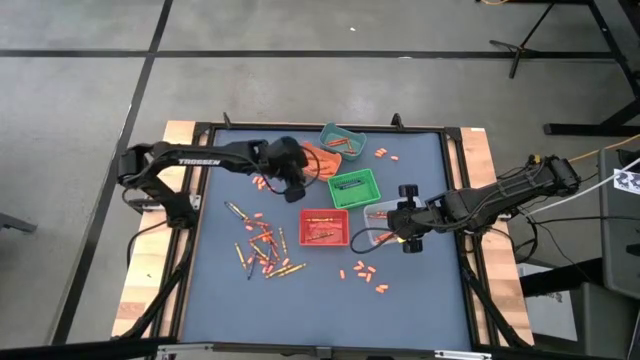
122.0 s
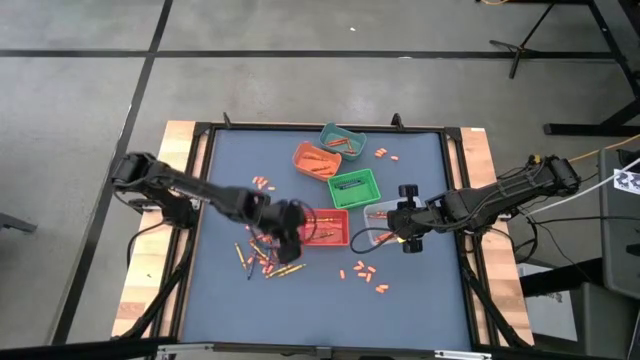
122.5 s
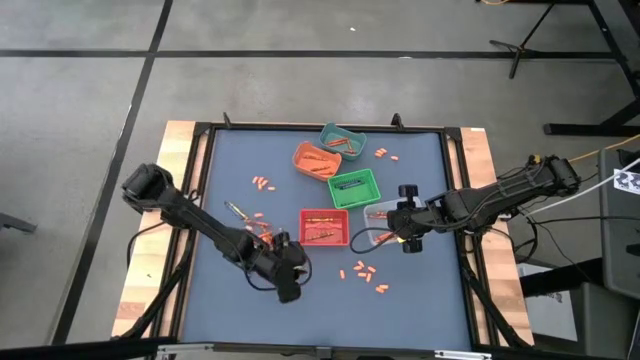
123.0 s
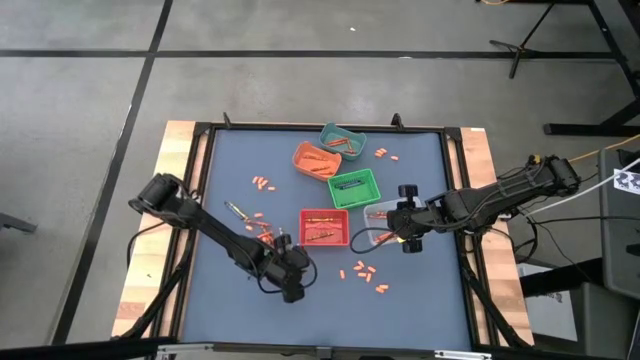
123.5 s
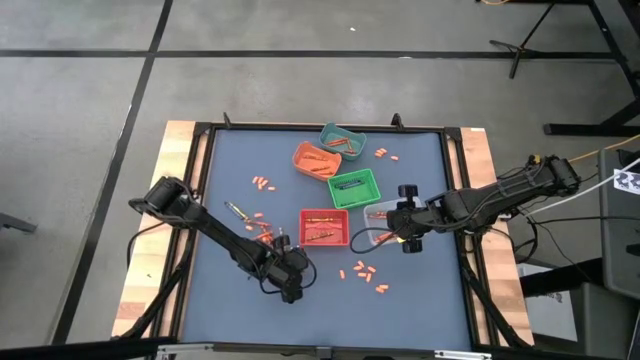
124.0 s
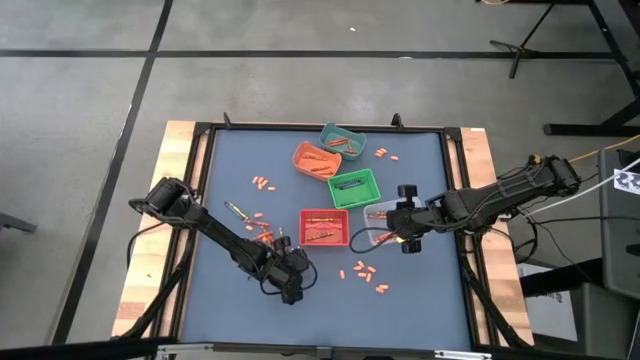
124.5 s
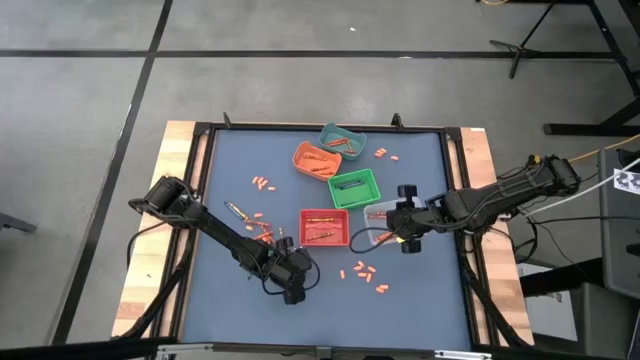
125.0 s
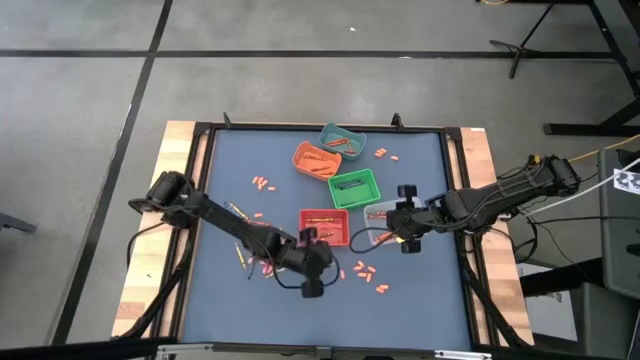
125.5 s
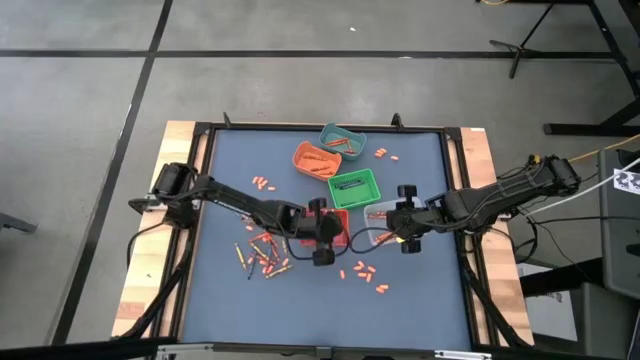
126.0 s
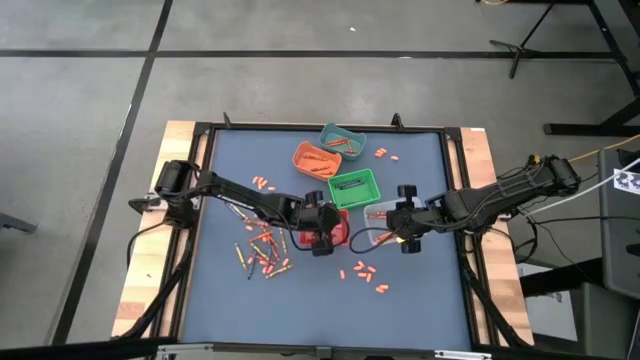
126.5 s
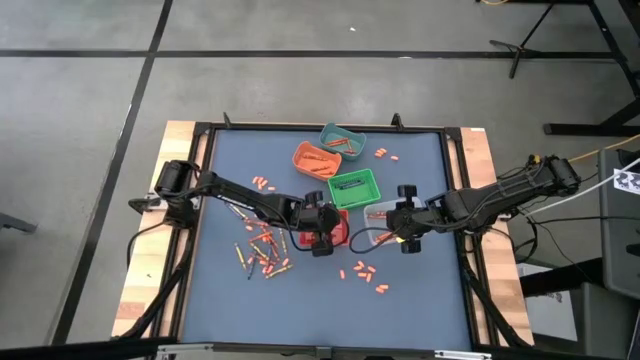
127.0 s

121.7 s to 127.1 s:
Task: Sort crayons
Put the yellow crayon into the red bin

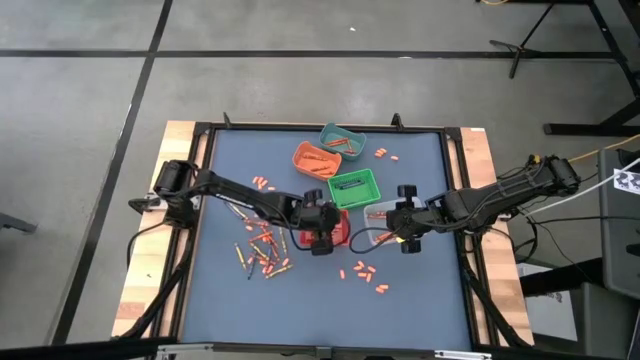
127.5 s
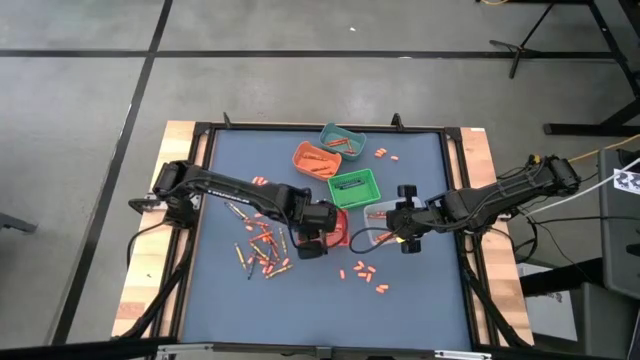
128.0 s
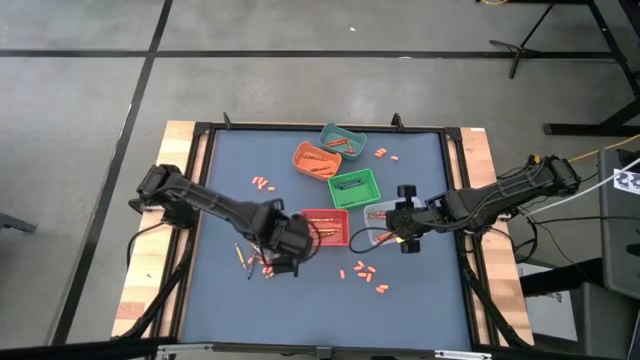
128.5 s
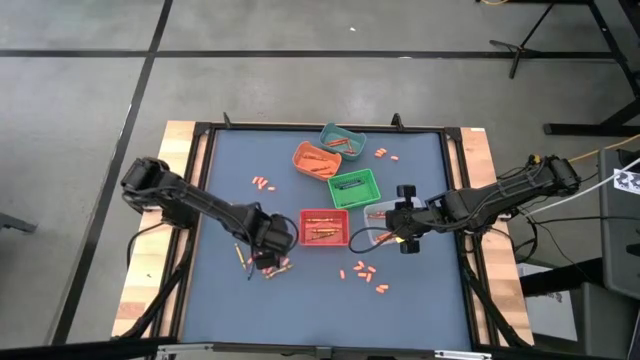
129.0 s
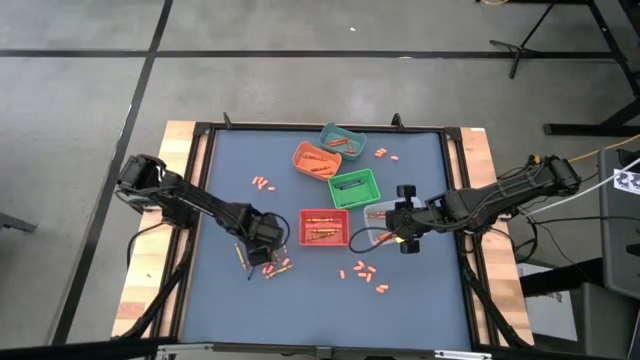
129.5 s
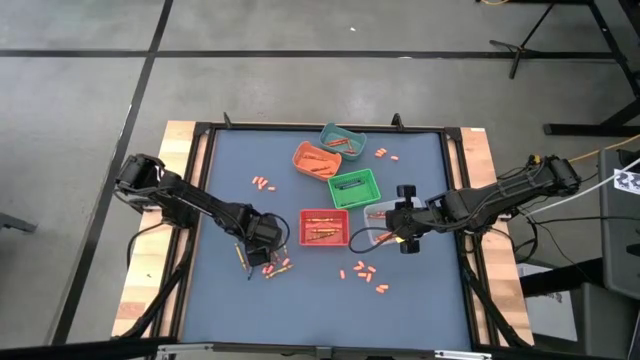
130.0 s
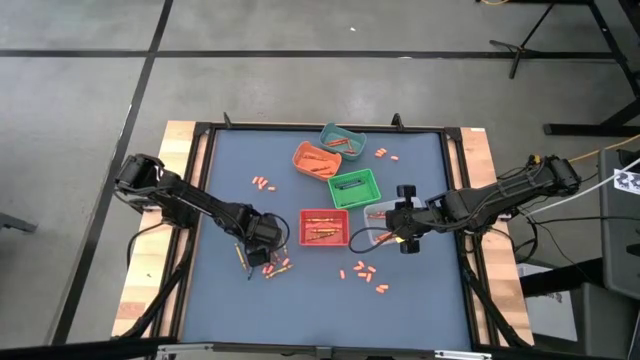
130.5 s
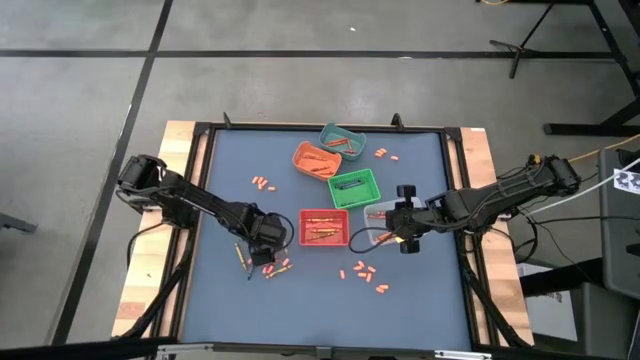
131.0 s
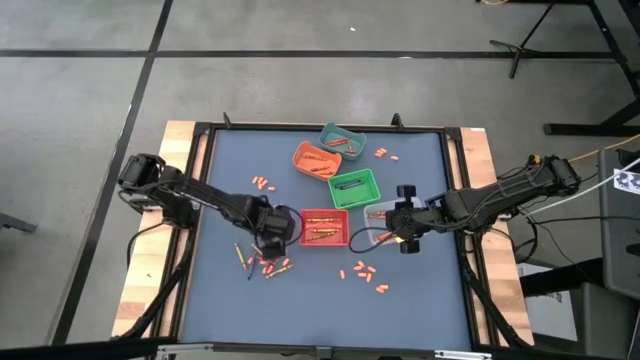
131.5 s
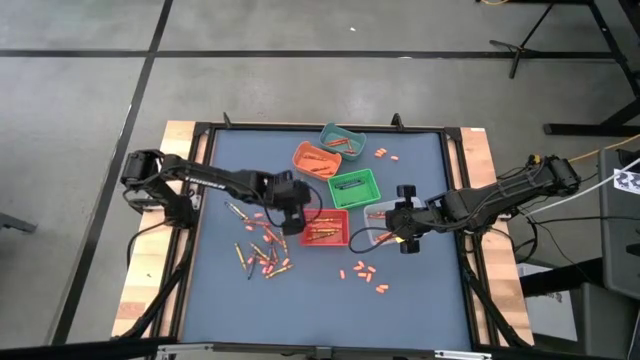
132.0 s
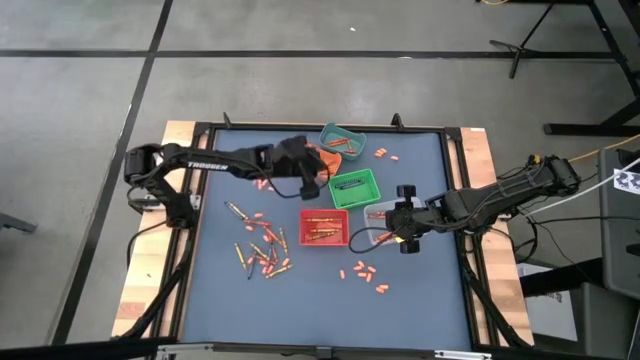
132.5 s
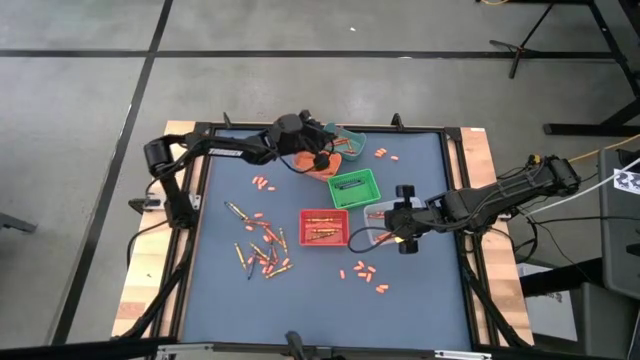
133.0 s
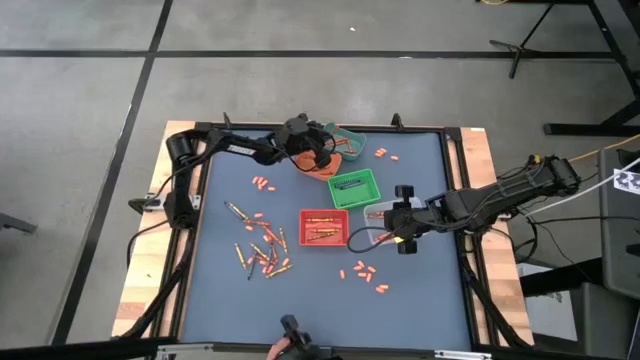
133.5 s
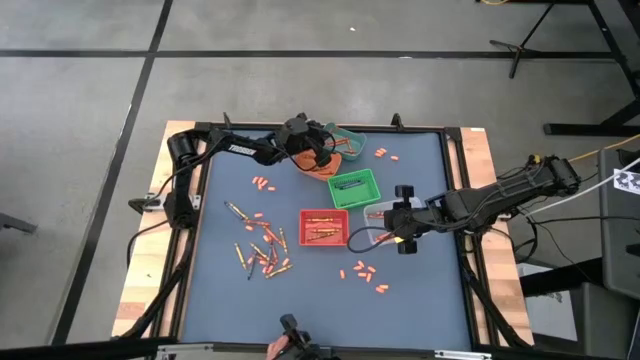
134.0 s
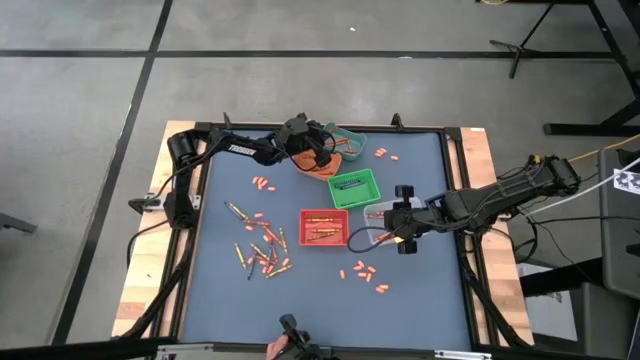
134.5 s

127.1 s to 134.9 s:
Put the red orange crayon into the blue bin

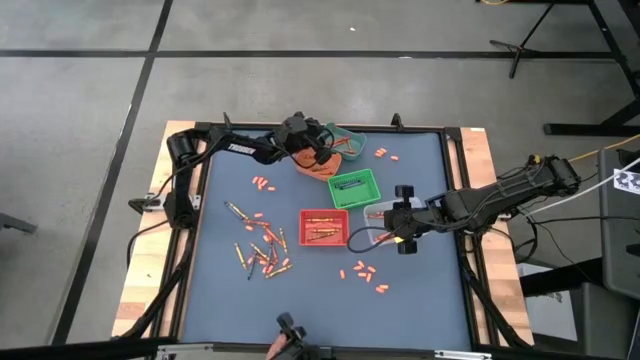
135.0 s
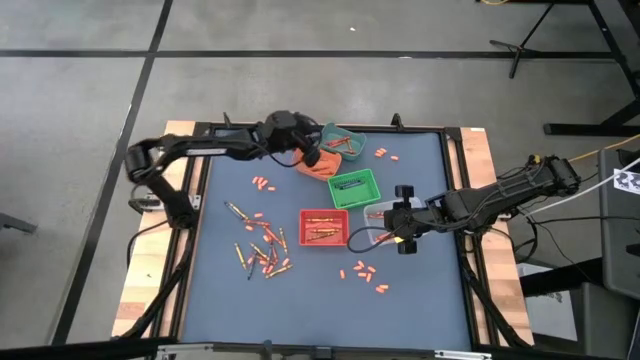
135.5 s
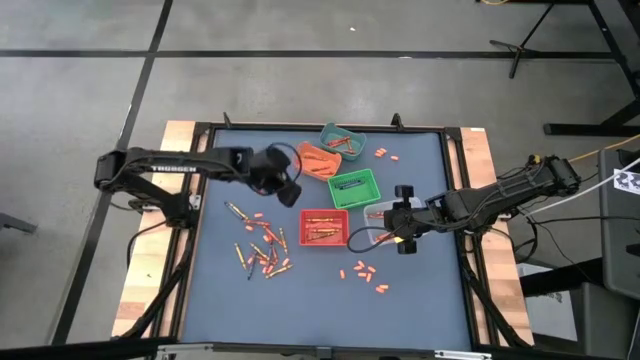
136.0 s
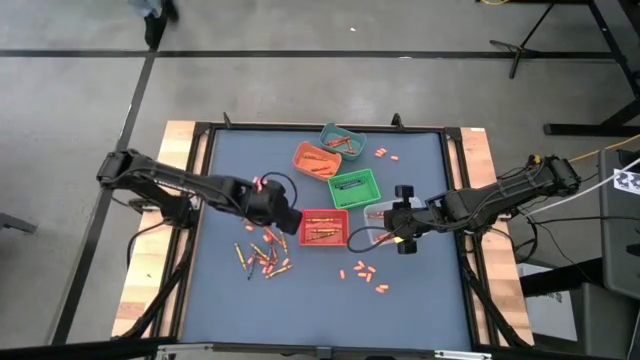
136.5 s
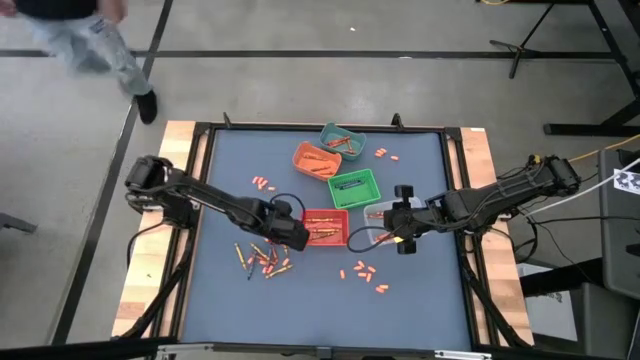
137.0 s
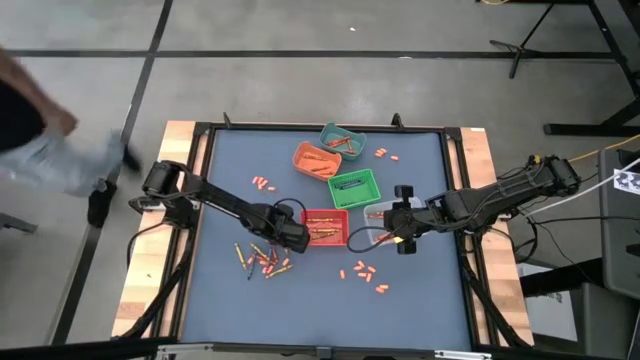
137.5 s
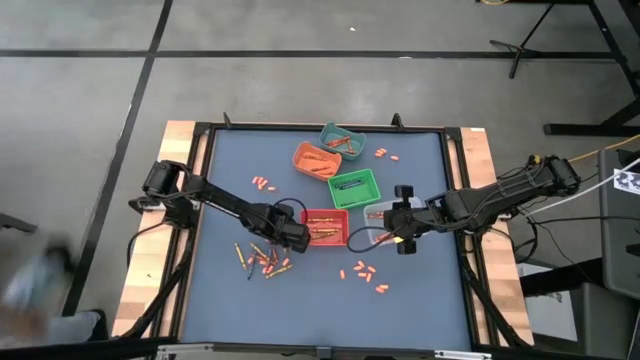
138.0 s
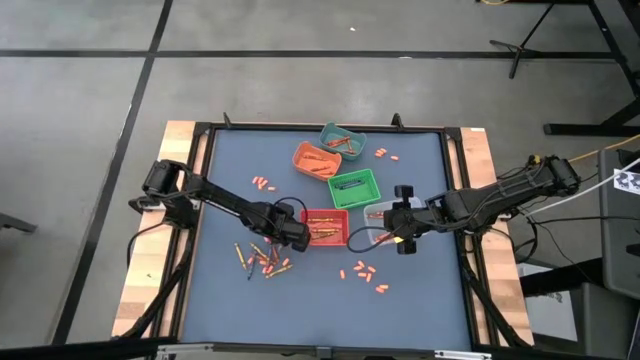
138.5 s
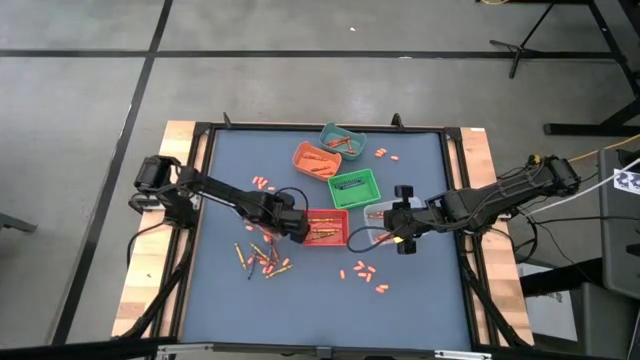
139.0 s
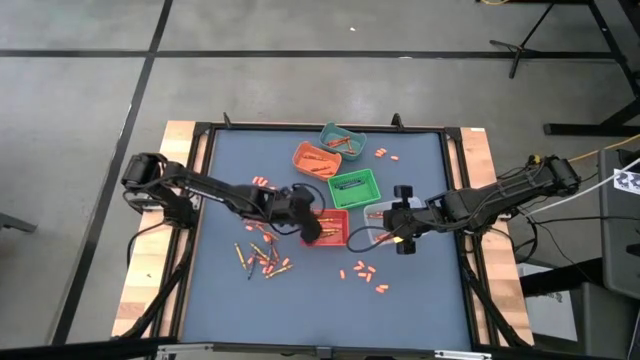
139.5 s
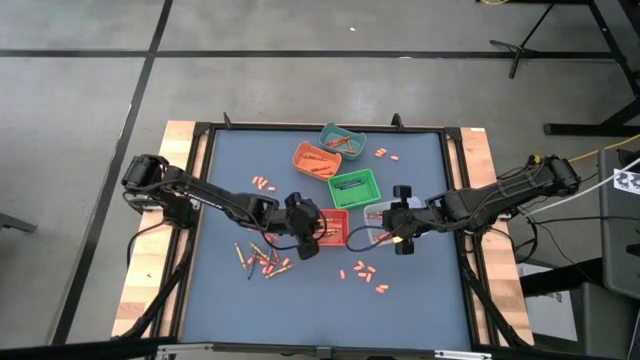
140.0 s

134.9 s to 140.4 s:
Put the yellow crayon into the red bin

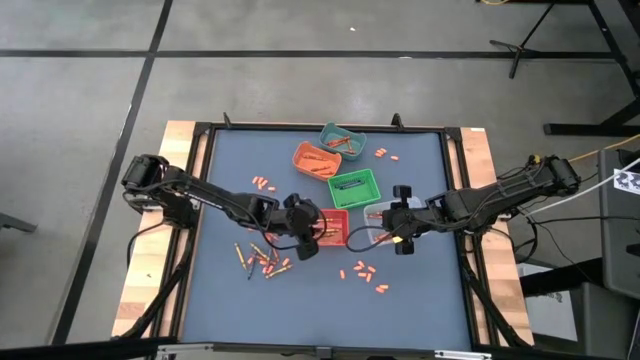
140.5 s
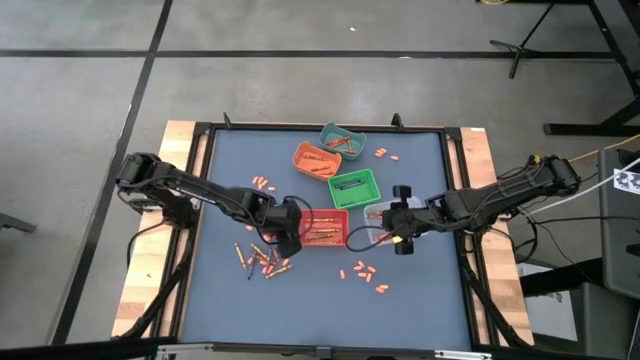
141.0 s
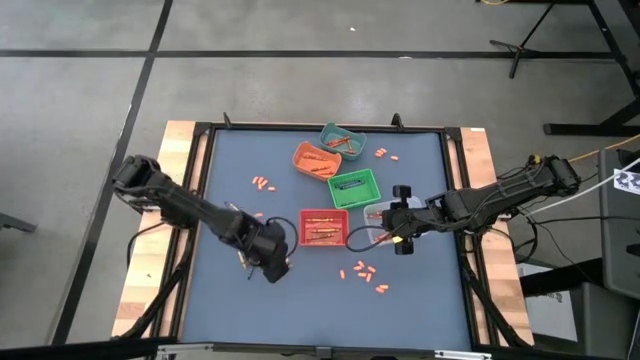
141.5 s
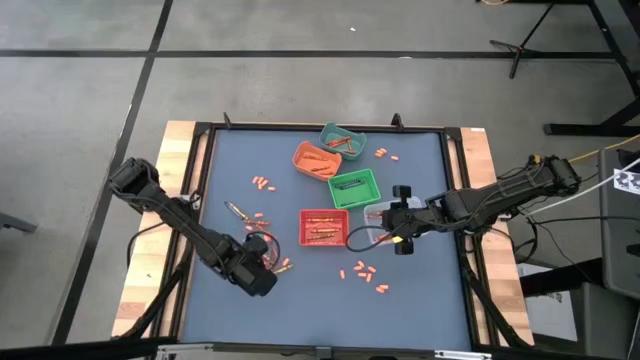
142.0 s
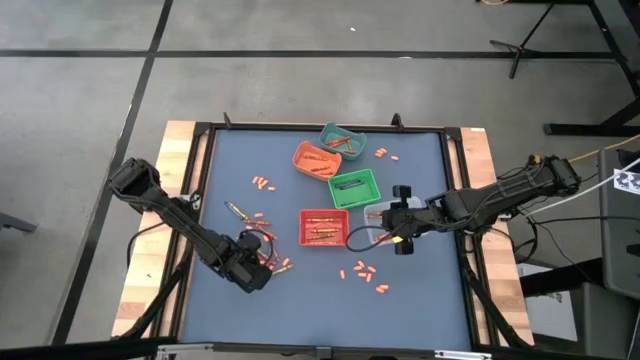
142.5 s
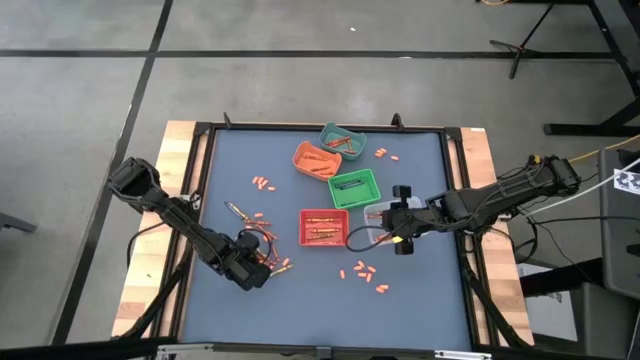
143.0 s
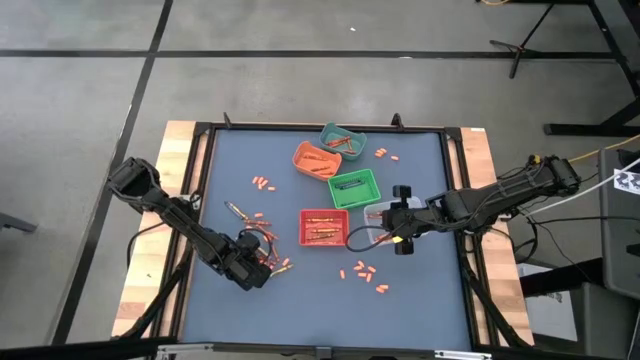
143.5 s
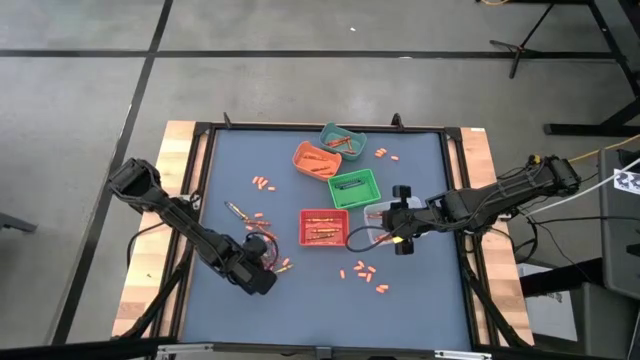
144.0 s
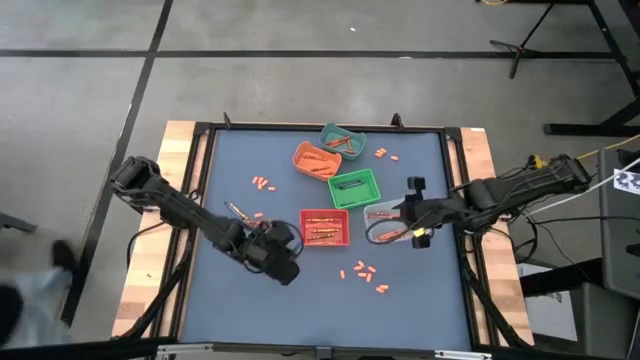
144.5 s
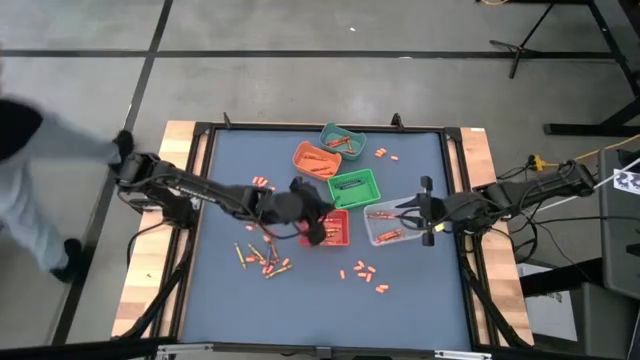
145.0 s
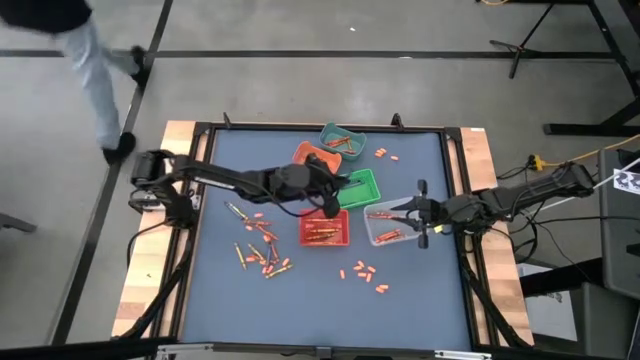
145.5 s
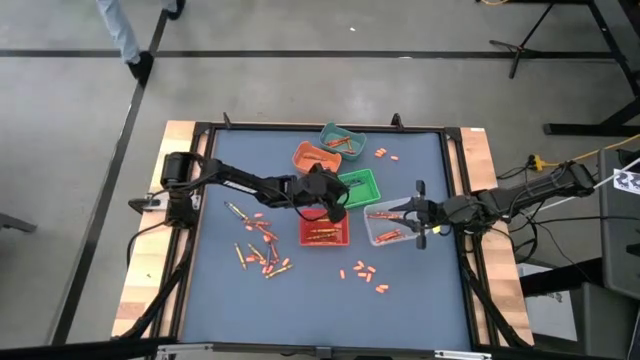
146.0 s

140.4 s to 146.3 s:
Put the blue crayon into the green bin
